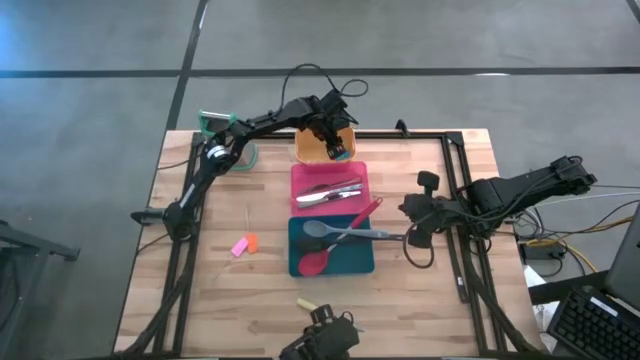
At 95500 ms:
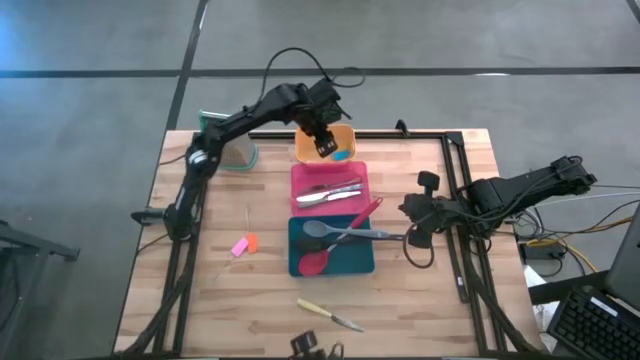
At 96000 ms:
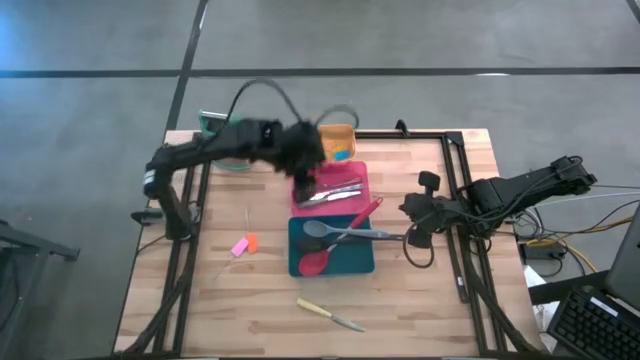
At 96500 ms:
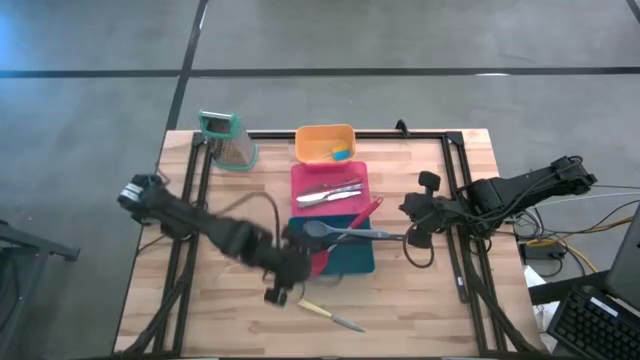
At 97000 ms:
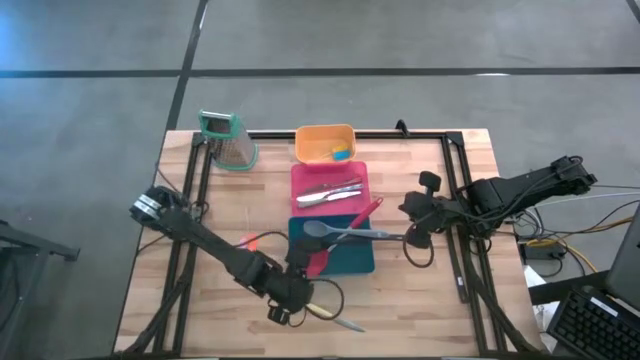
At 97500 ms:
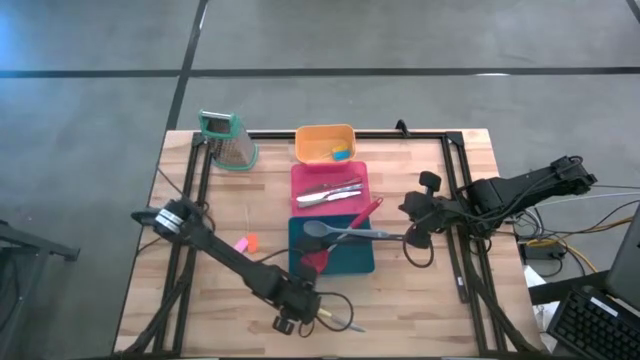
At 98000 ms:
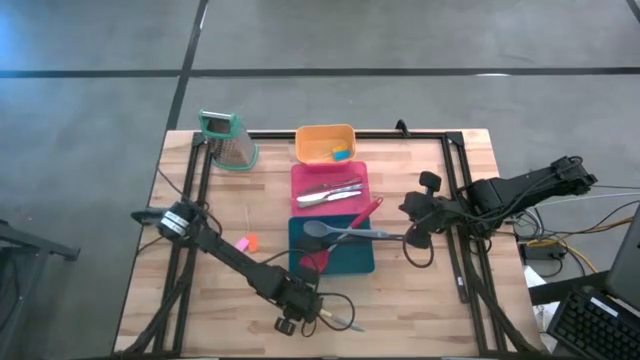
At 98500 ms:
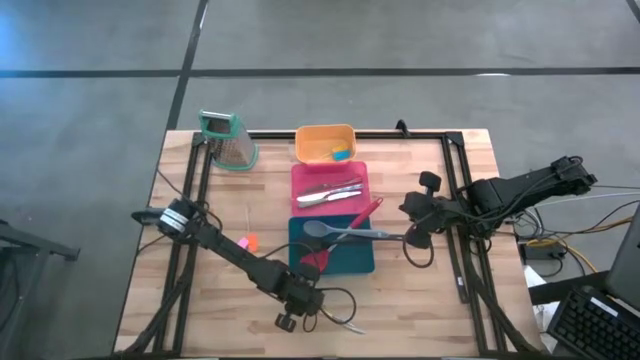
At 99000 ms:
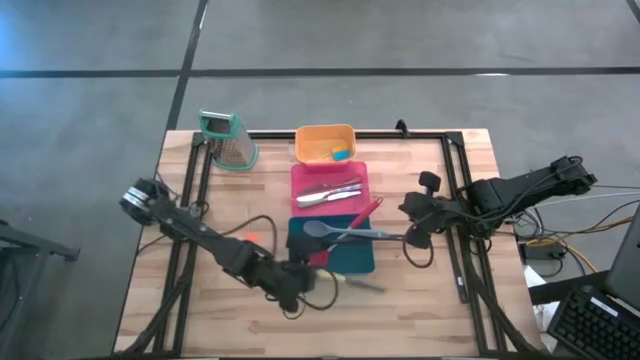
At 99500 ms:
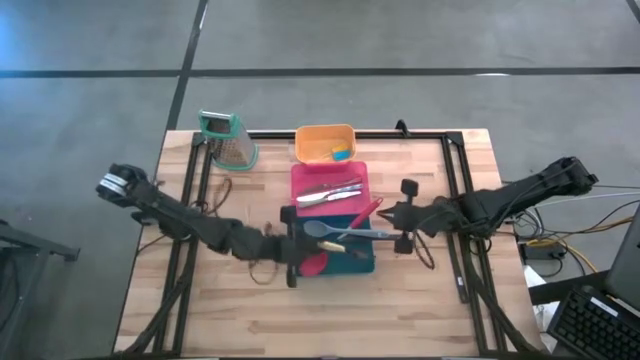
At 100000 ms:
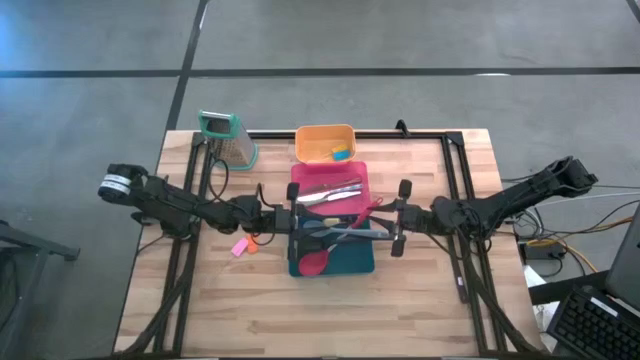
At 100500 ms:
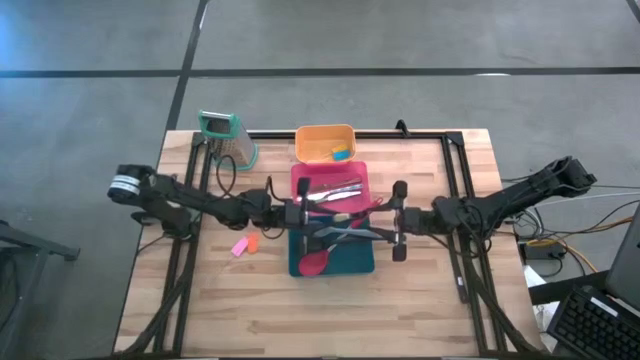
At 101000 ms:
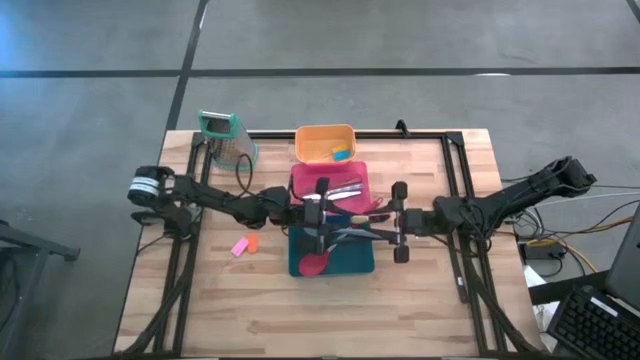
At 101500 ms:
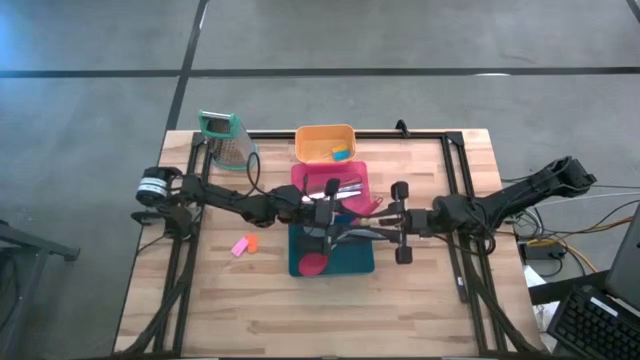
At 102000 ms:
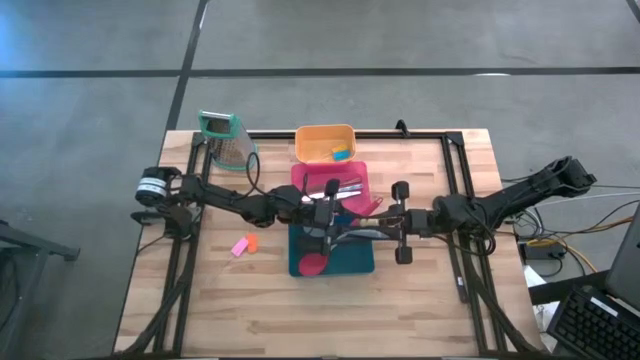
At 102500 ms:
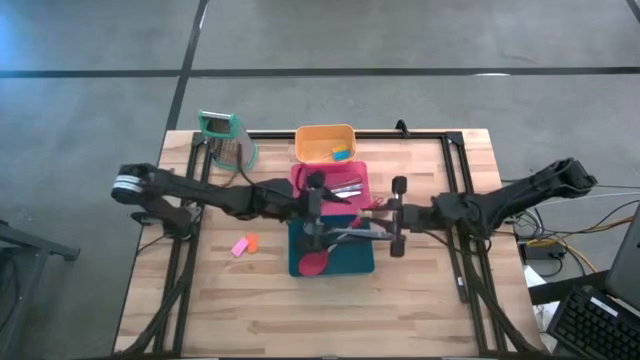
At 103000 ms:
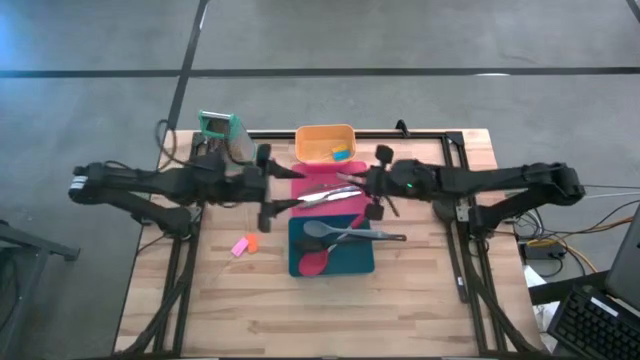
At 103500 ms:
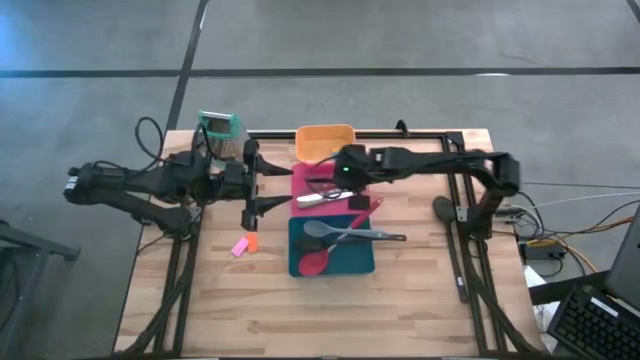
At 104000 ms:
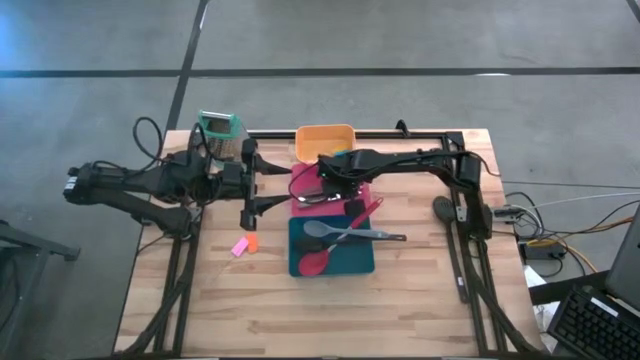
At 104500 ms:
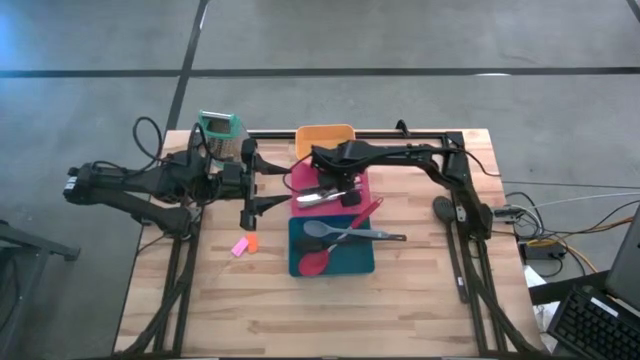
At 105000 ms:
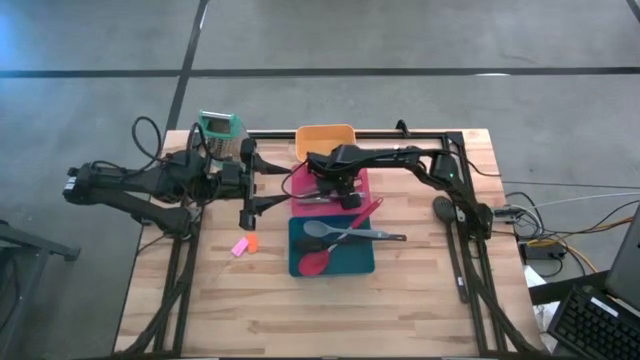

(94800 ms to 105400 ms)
Task: Pick & Place Kitchen Items
Put the yellow knife into the red bin

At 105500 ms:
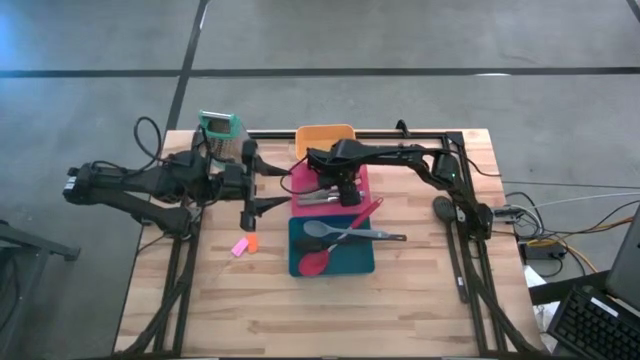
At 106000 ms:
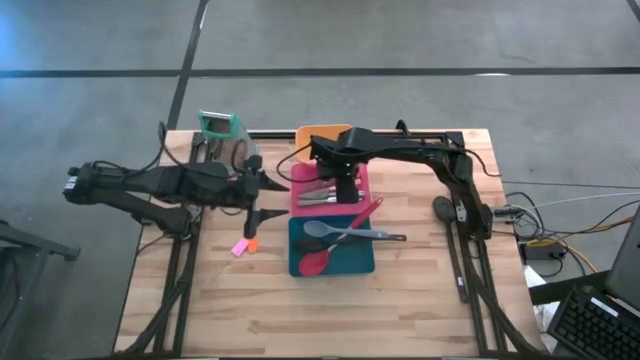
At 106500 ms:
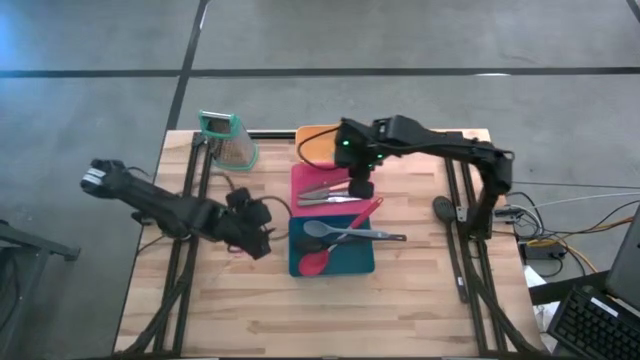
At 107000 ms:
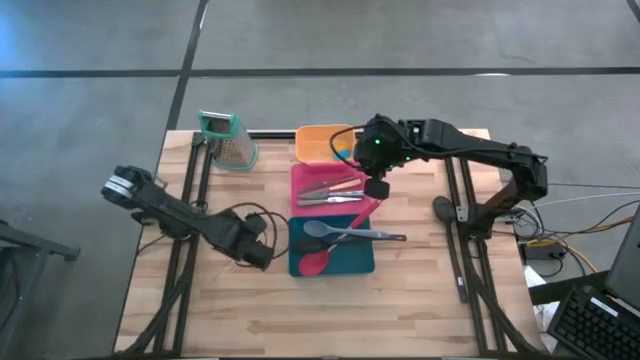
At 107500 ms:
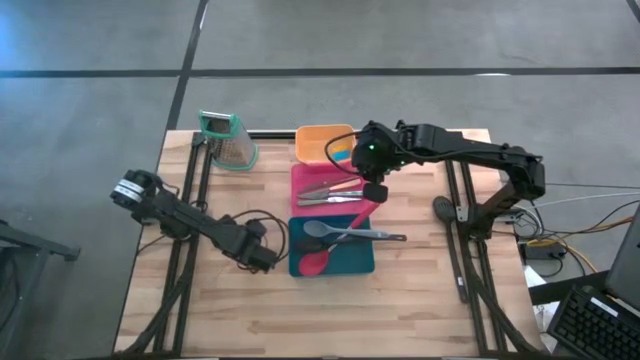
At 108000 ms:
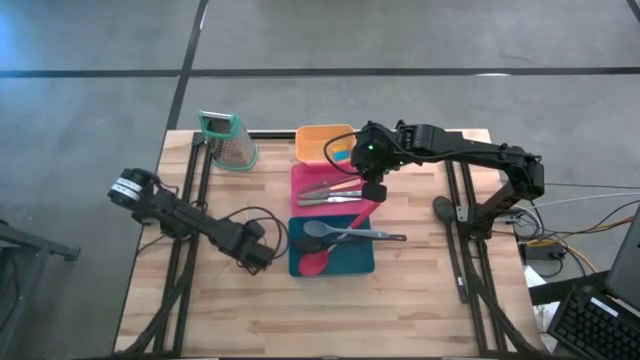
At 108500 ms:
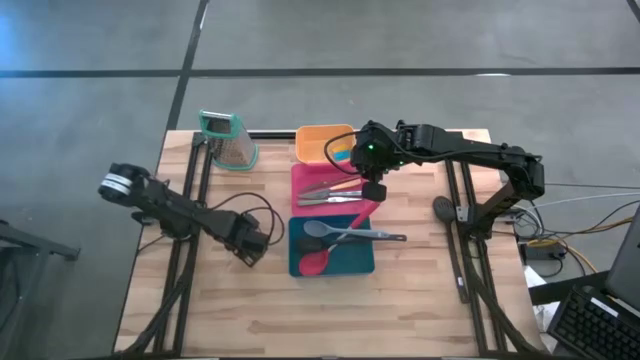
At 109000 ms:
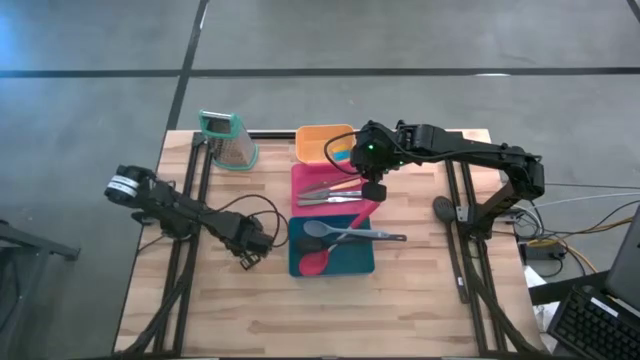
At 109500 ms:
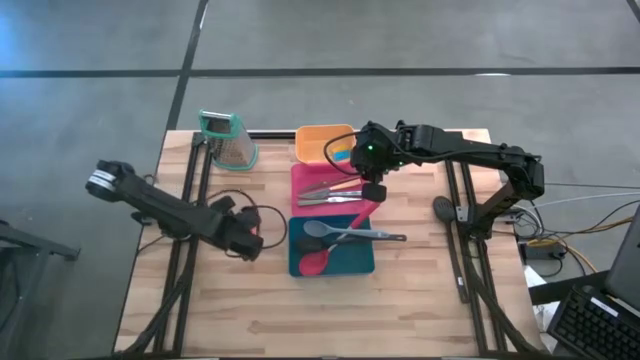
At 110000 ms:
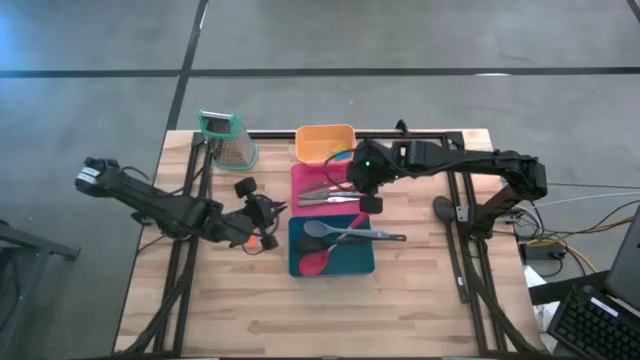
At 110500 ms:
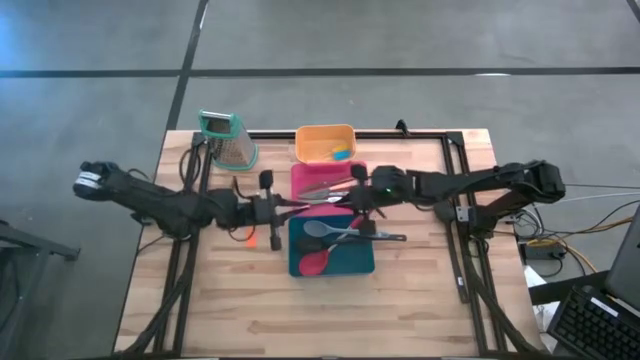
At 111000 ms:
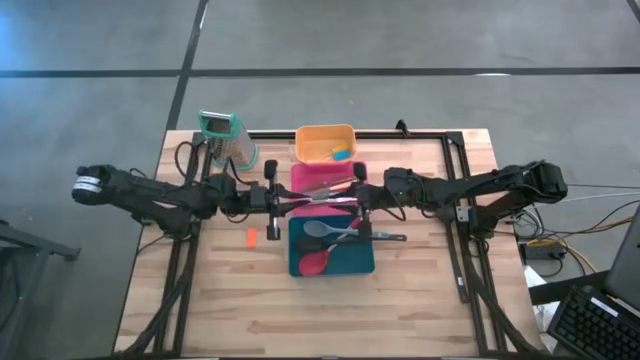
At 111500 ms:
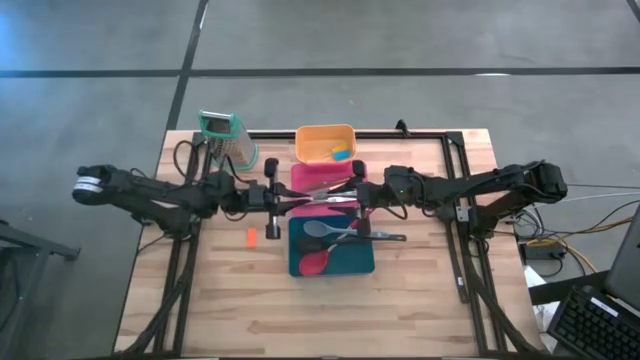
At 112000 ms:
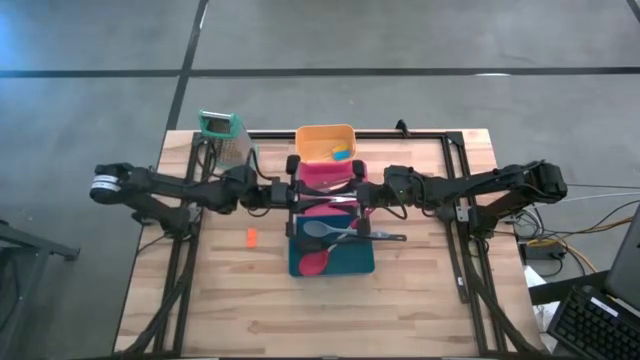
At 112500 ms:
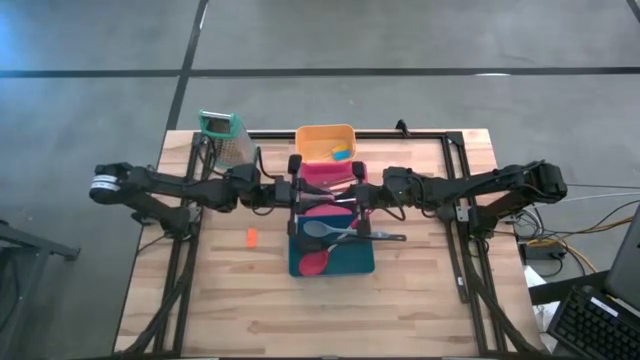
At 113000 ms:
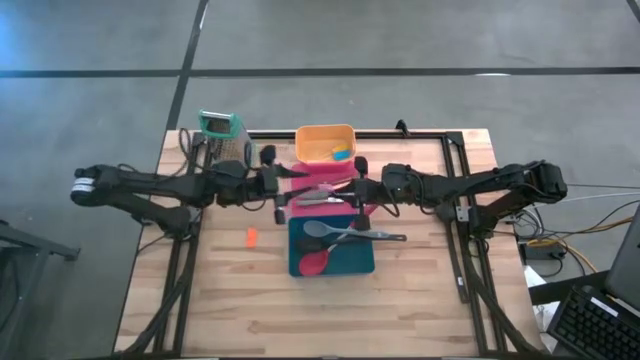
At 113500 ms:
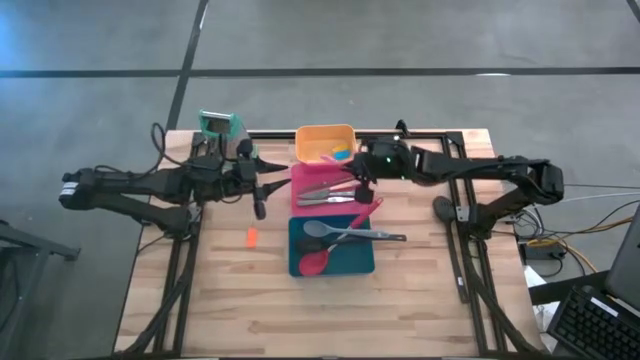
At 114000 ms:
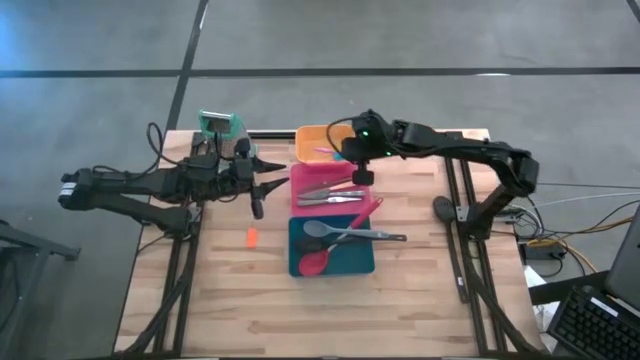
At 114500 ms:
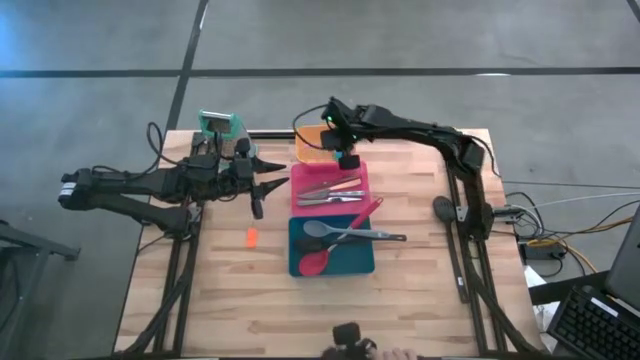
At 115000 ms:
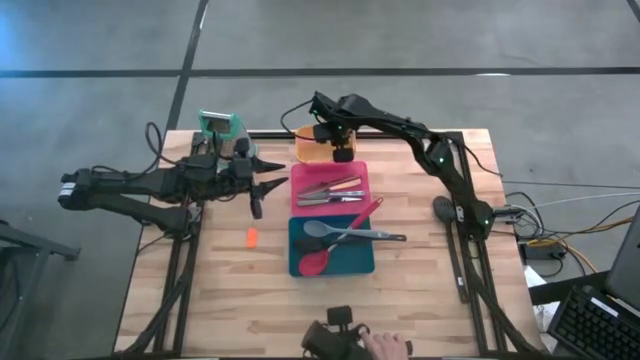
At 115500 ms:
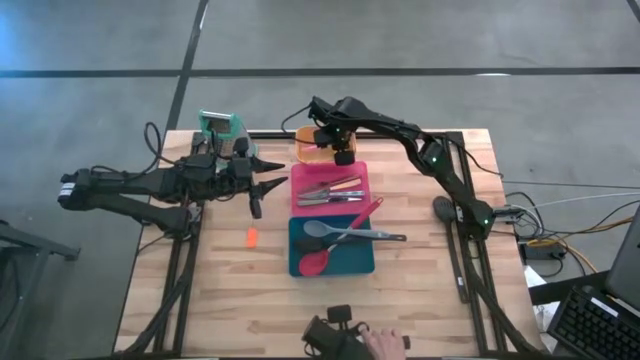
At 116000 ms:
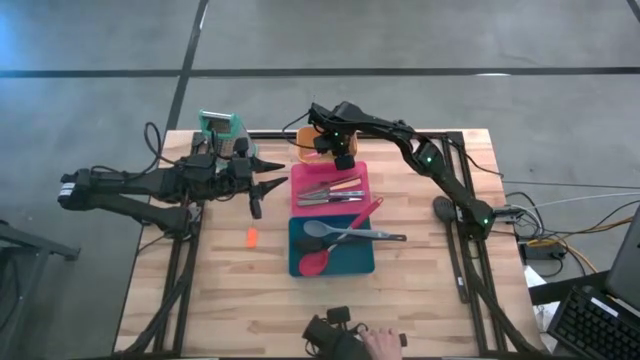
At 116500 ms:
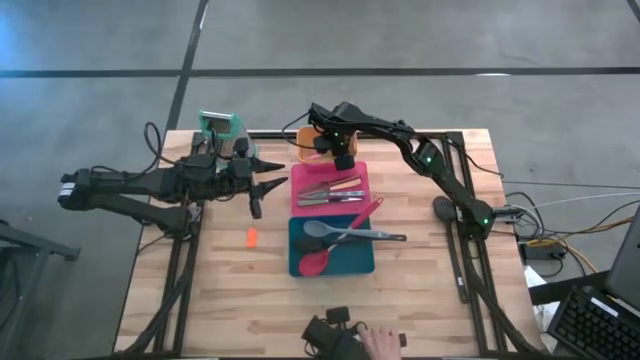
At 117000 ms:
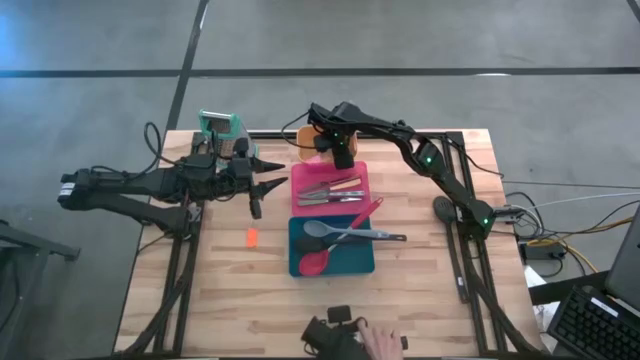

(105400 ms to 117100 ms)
Put the pink spatula into the yellow bin
